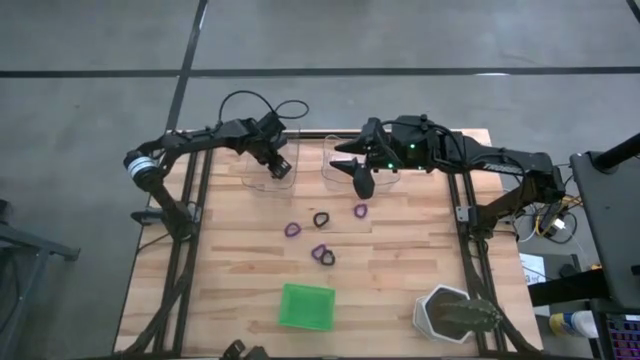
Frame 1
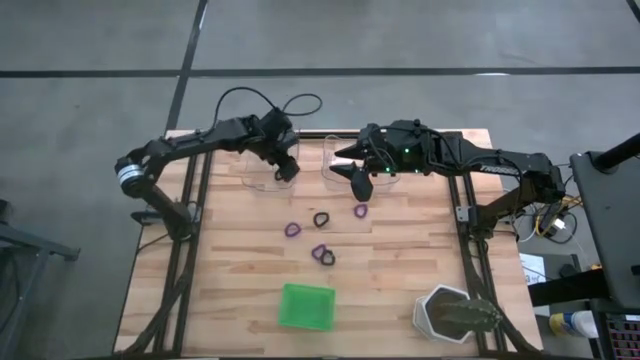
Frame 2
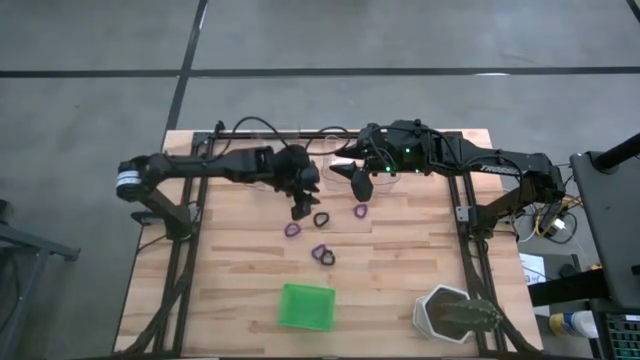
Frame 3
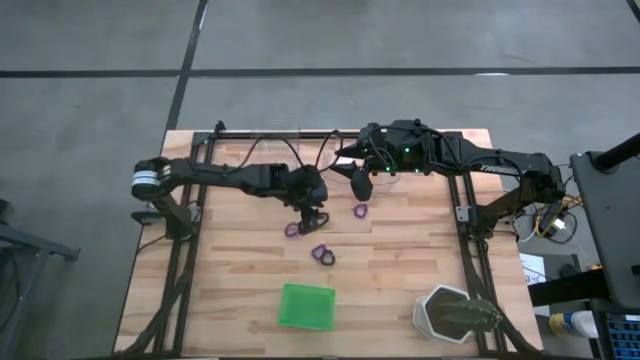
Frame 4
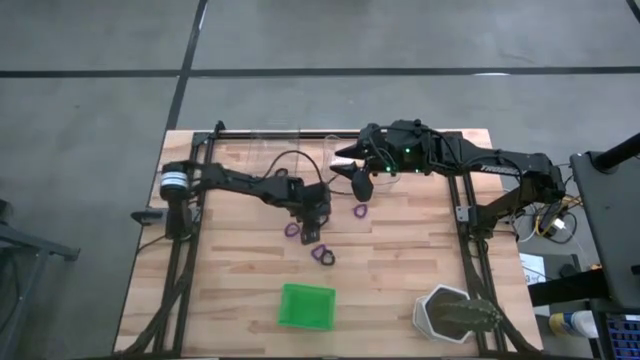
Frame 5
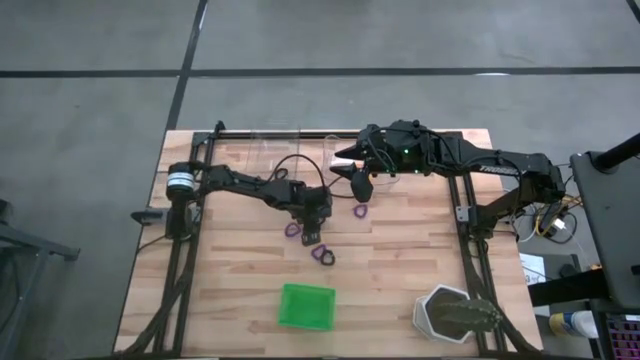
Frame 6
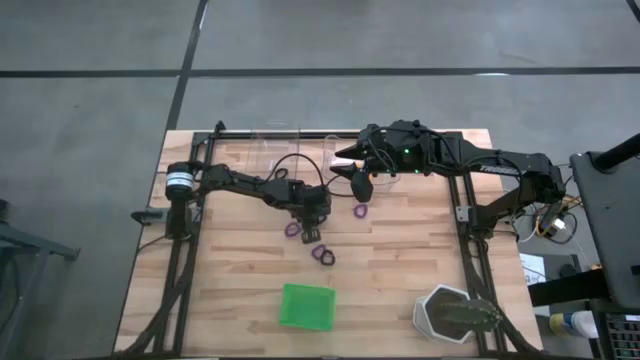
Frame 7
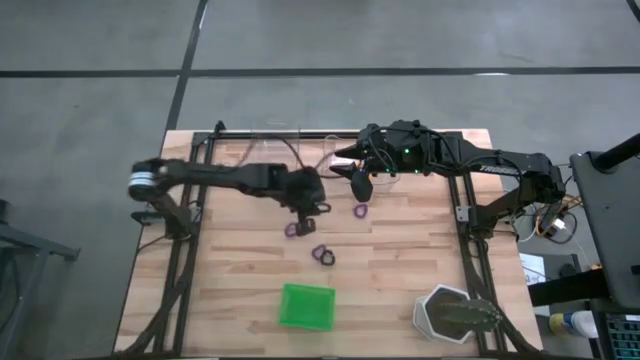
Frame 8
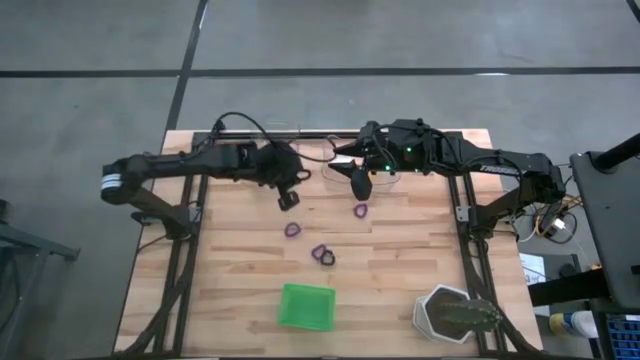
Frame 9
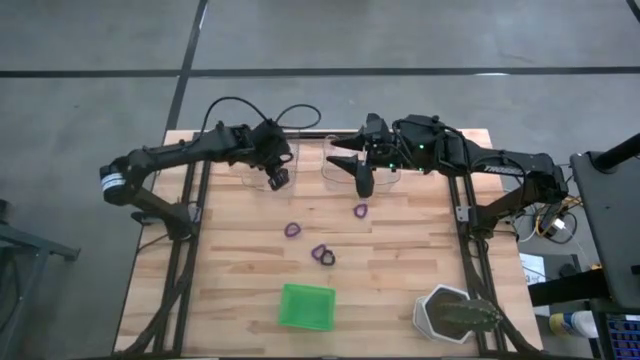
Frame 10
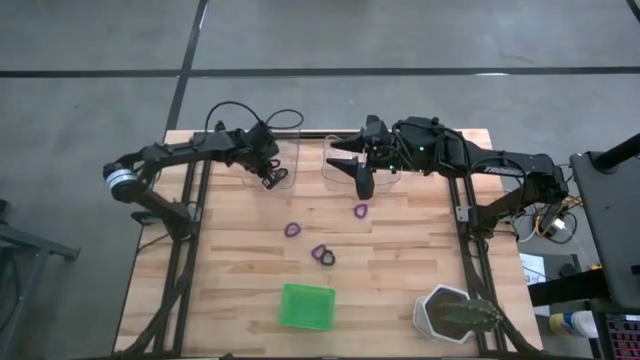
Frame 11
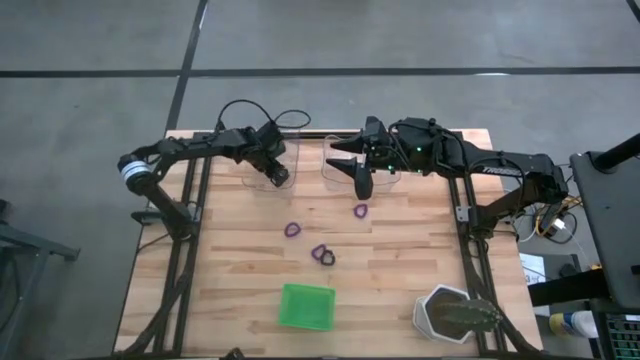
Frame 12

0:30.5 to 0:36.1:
Task: Sort spring keychains
Put the top black spring keychain into the left transparent bin

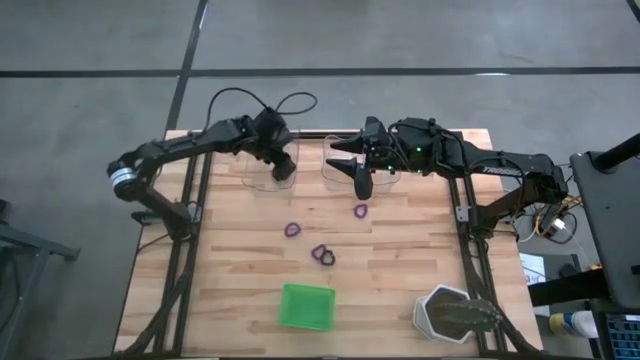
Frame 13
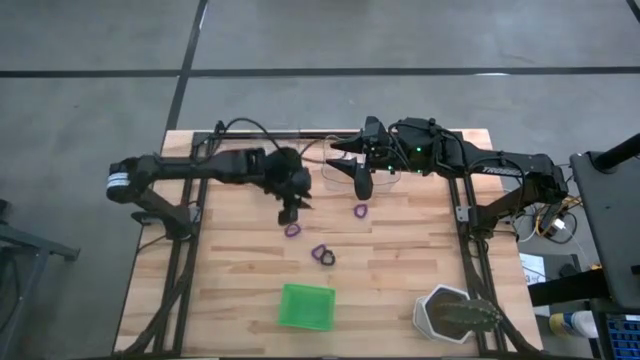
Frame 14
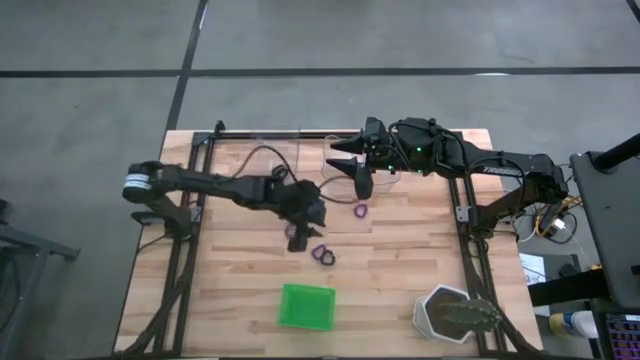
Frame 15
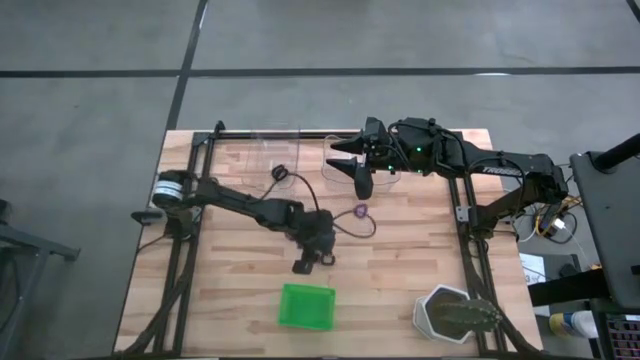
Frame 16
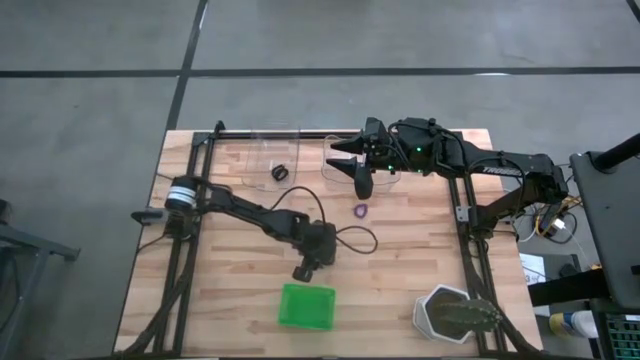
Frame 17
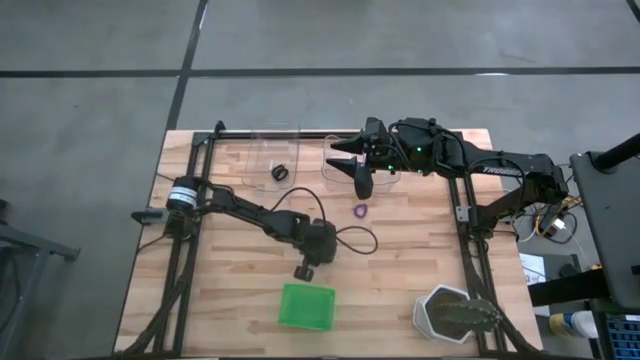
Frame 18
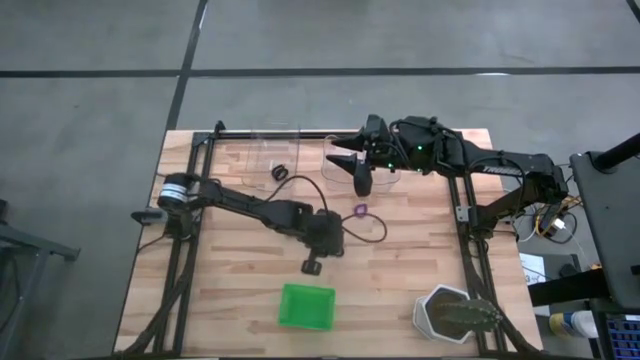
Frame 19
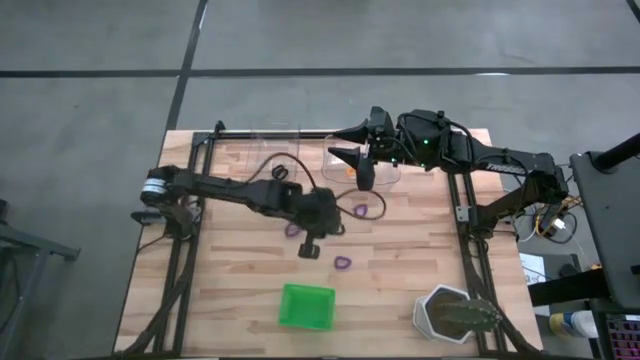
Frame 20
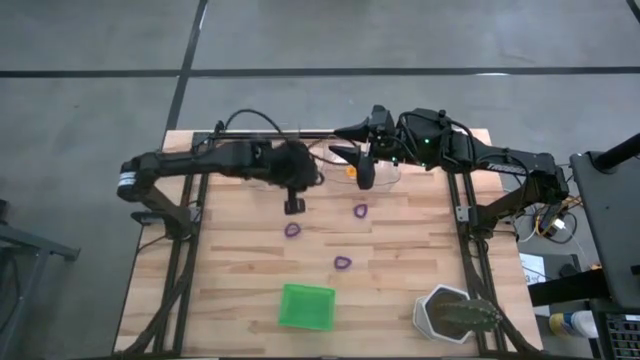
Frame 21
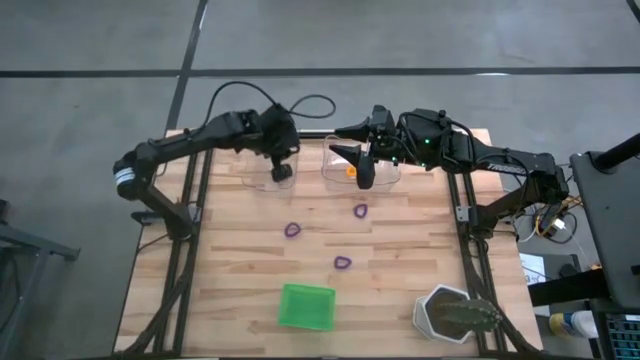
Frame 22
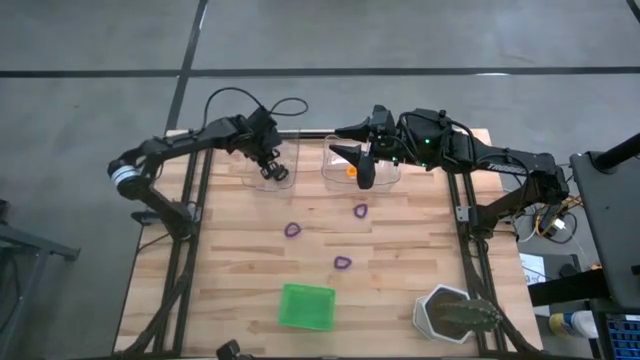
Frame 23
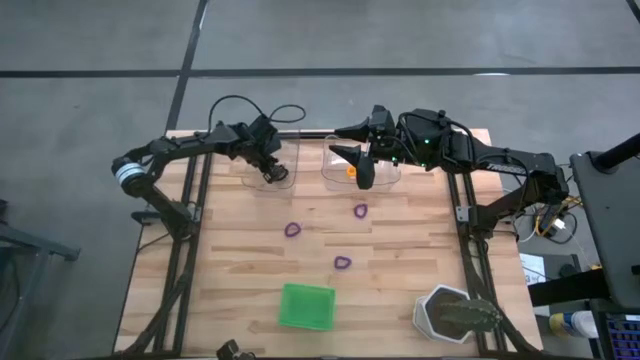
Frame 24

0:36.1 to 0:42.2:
Put the black spring keychain into the left transparent bin

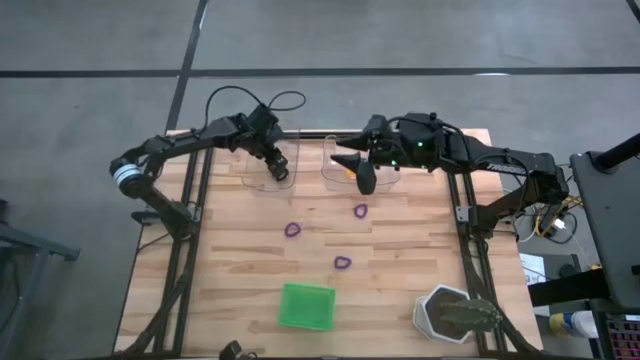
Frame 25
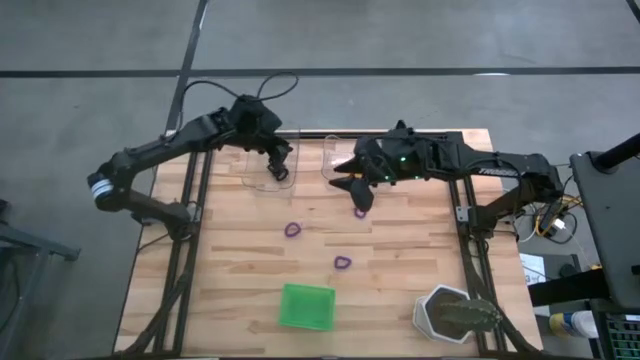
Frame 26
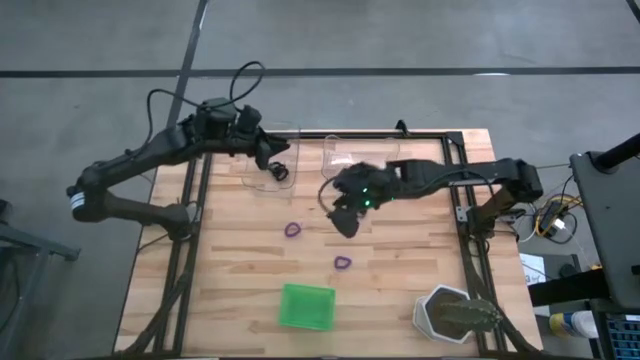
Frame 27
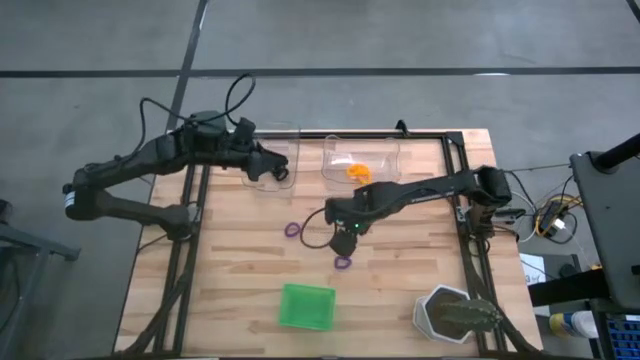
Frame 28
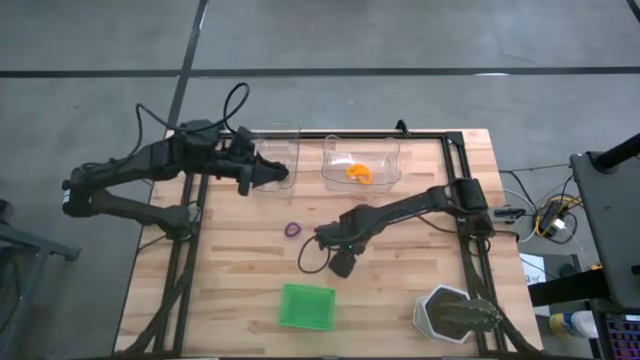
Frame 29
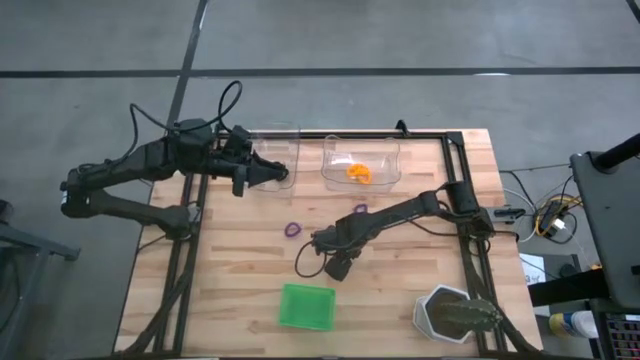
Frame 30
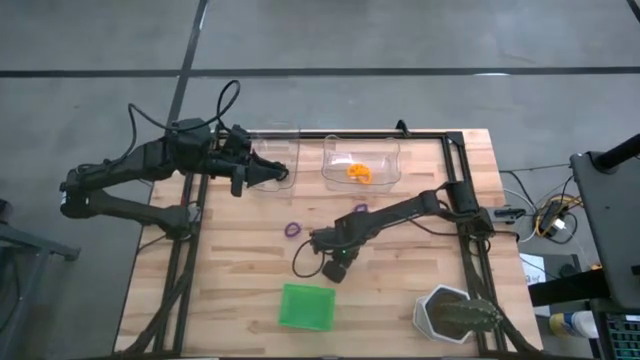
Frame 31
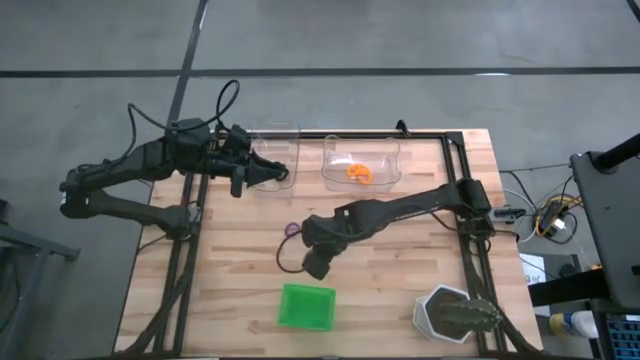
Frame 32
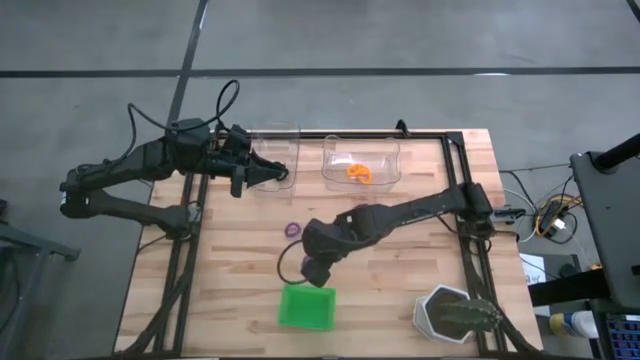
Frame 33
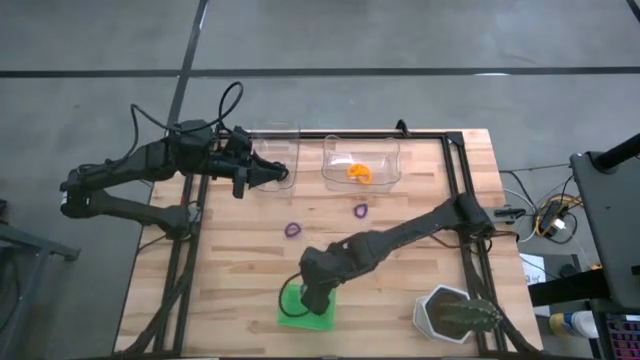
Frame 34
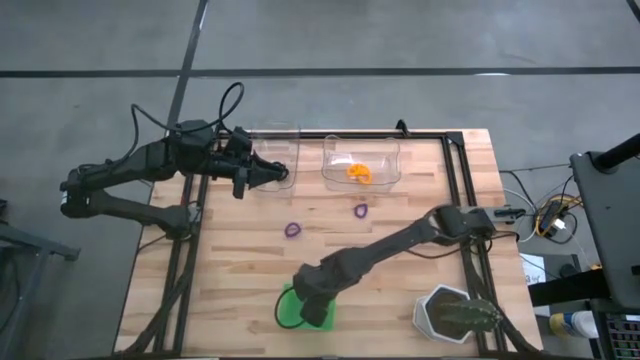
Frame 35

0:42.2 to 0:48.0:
Put the bottom violet spring keychain into the green bin

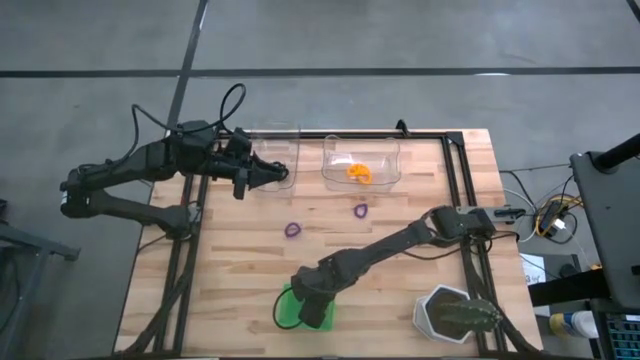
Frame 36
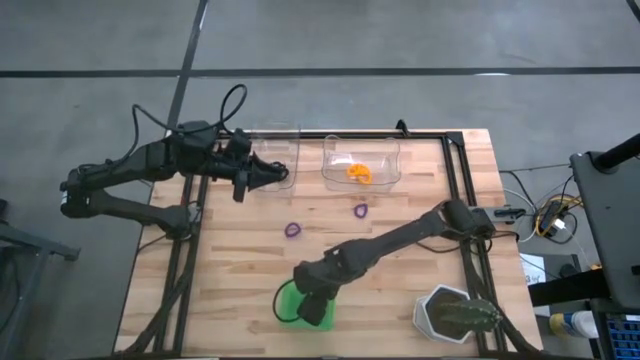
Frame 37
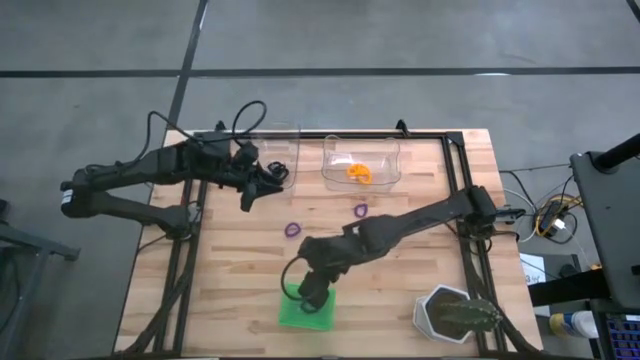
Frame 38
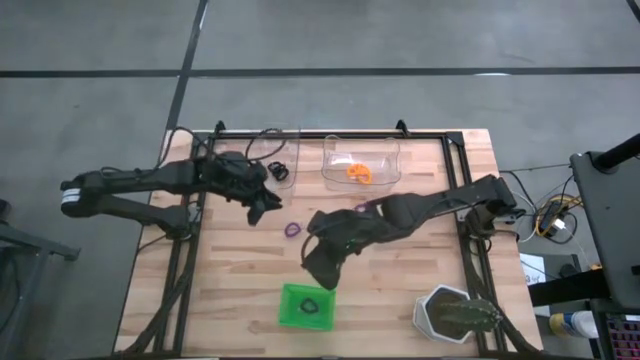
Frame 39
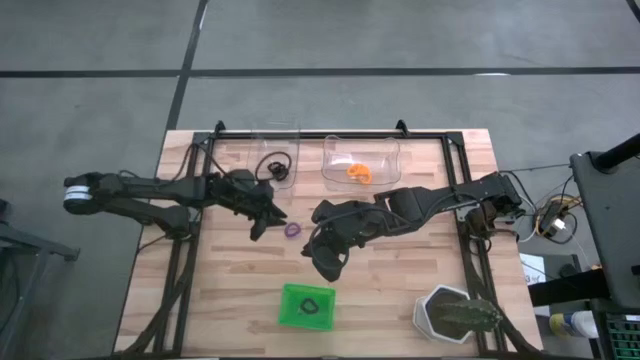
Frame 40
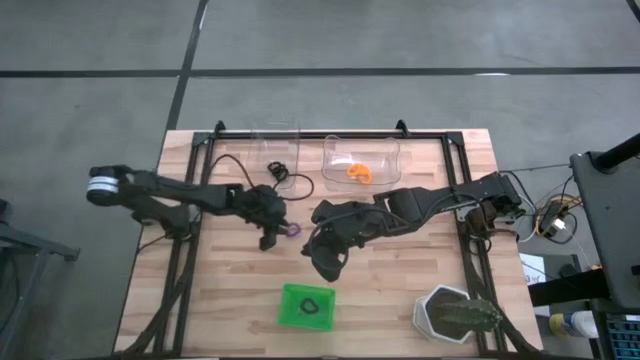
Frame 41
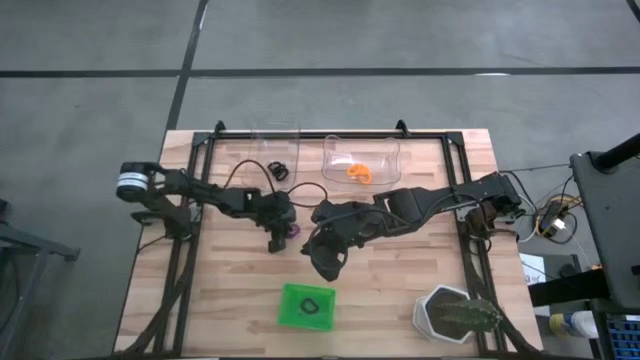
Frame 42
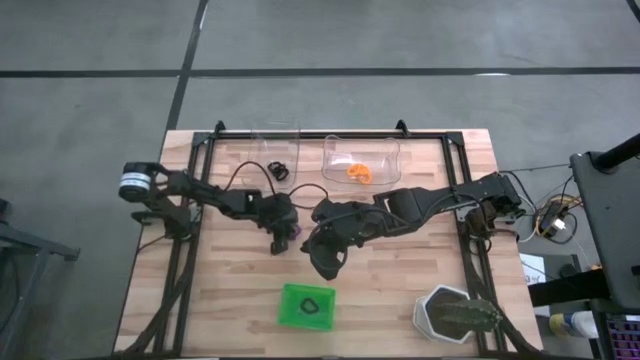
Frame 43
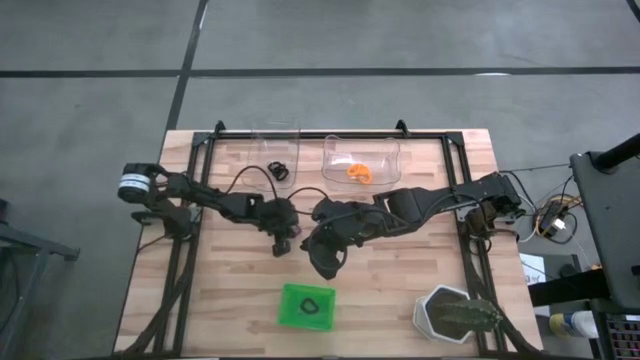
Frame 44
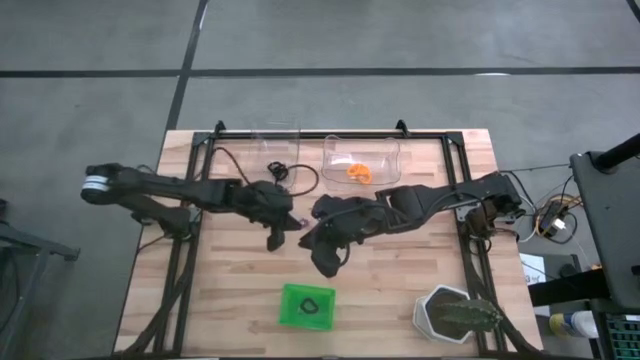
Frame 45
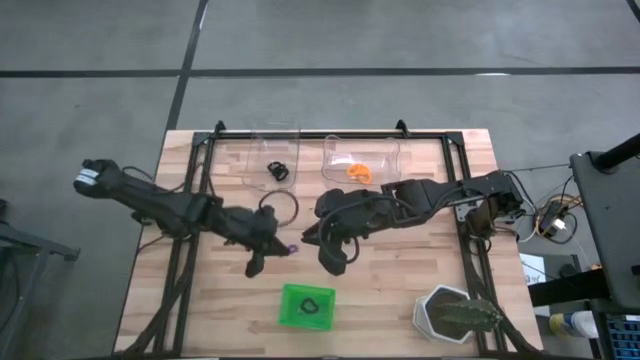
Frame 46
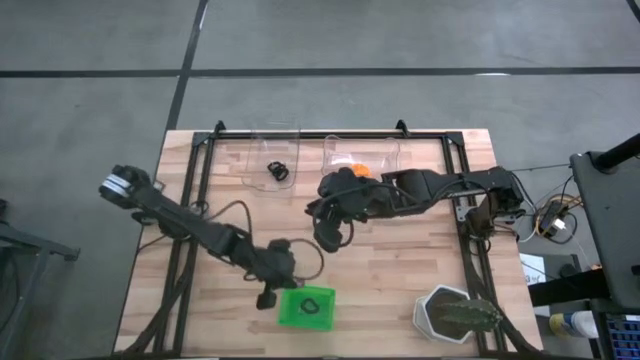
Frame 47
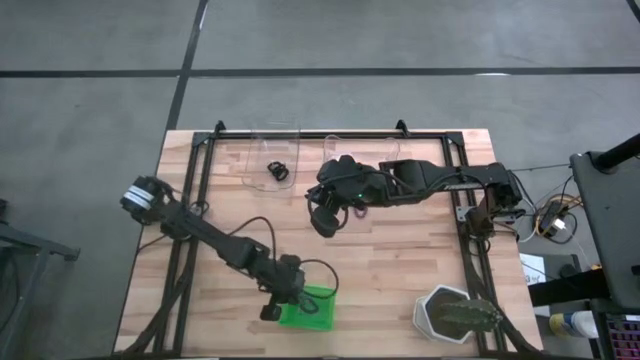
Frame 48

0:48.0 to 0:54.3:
Put the left violet spring keychain into the green bin
